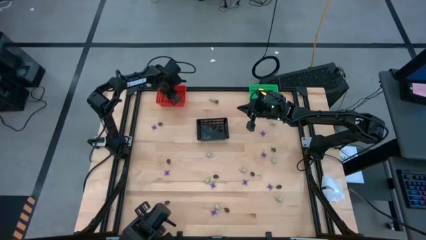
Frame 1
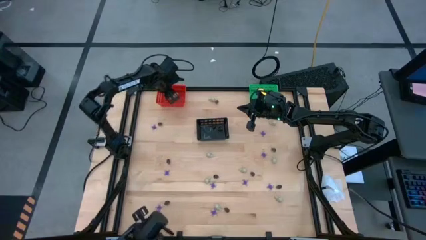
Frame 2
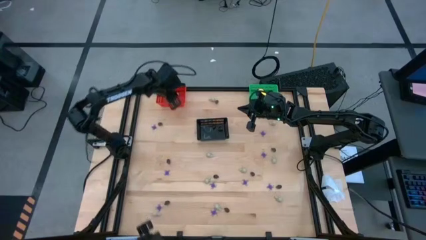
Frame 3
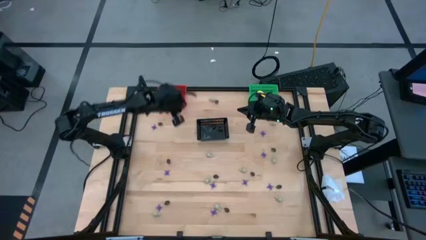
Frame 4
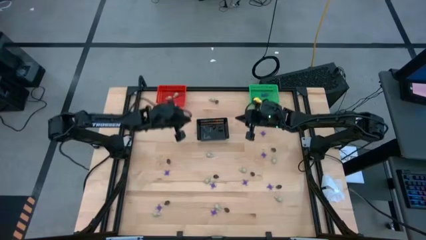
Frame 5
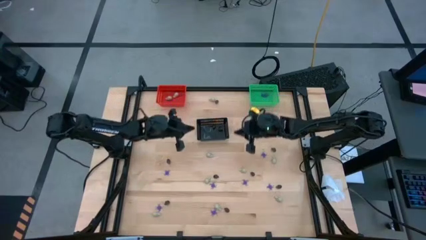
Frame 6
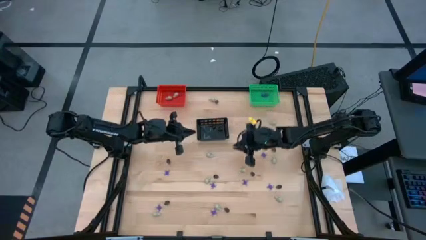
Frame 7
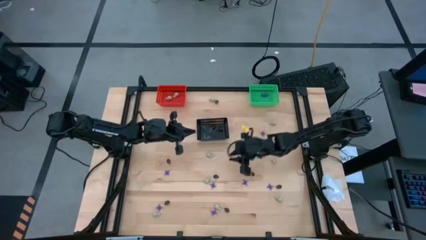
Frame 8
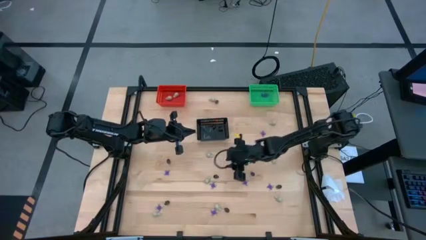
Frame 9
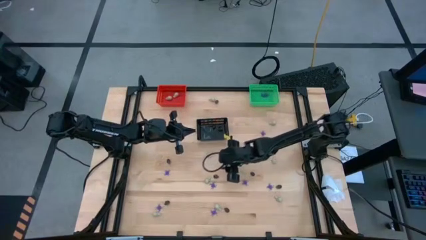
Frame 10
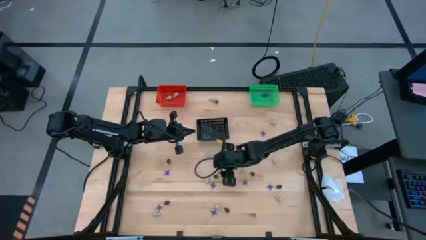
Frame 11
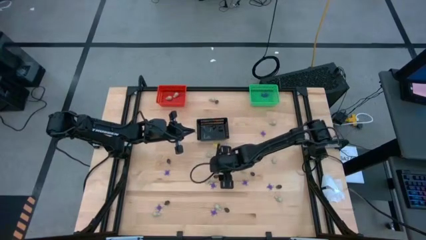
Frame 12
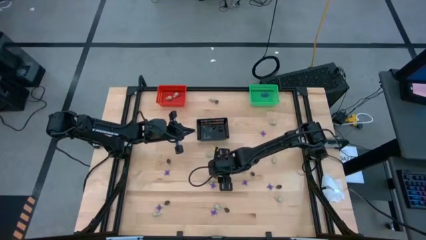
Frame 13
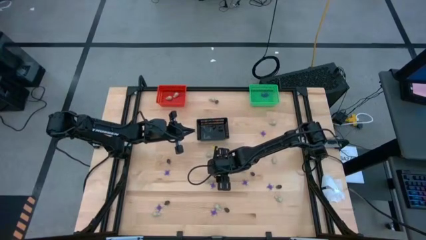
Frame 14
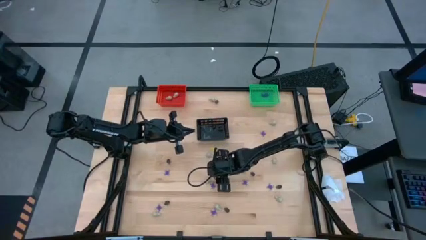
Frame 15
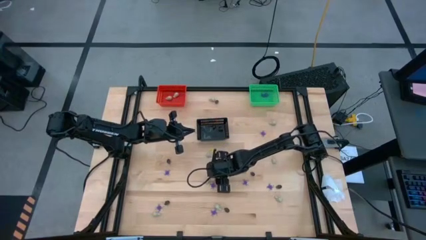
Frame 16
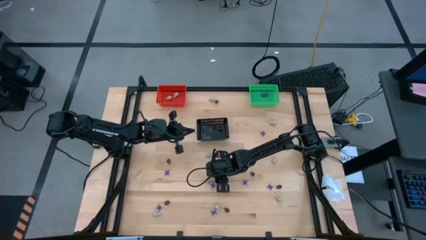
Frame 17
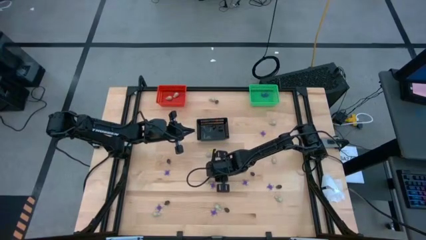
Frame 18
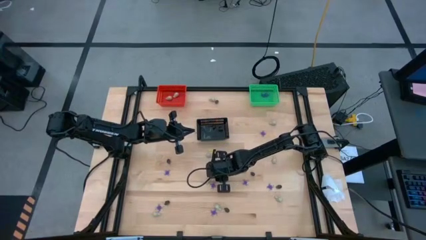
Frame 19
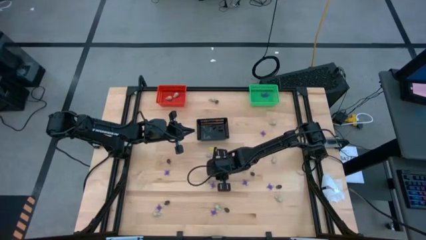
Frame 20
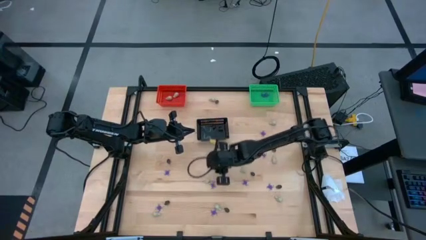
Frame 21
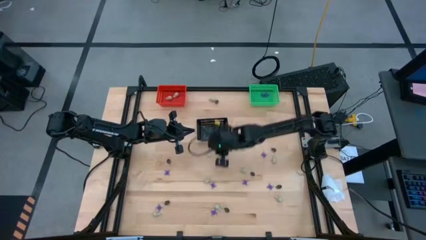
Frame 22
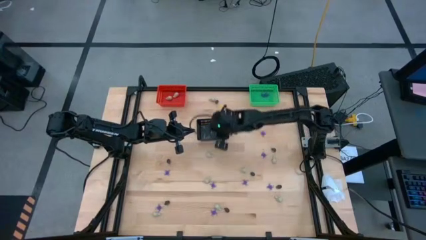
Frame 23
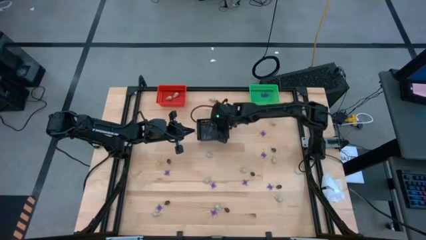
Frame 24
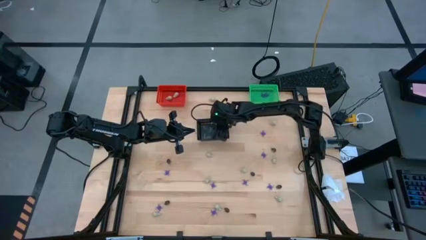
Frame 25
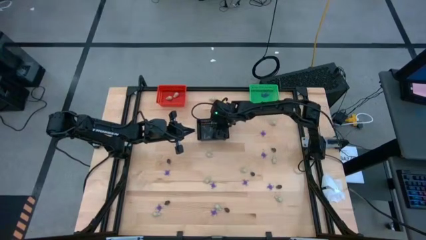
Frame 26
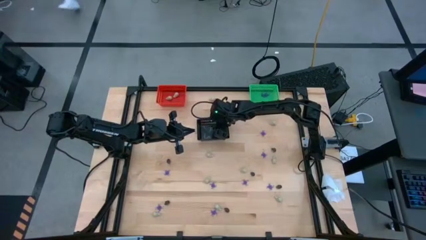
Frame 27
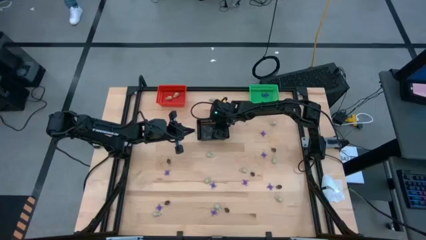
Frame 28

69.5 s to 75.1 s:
Task: Sort Halloween decoration
Put the black skull toy into the black bin

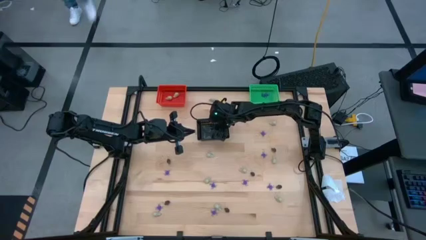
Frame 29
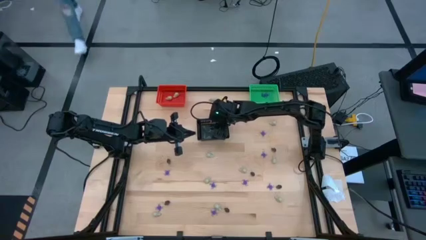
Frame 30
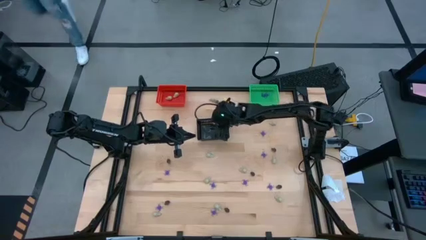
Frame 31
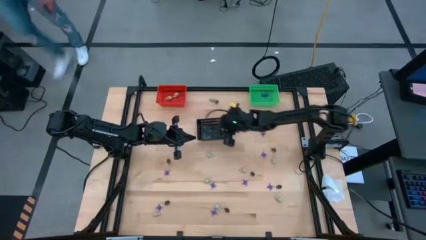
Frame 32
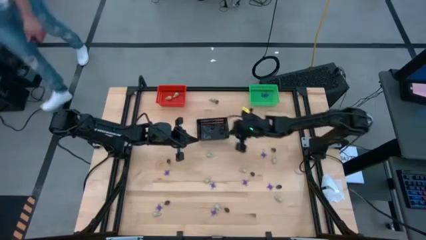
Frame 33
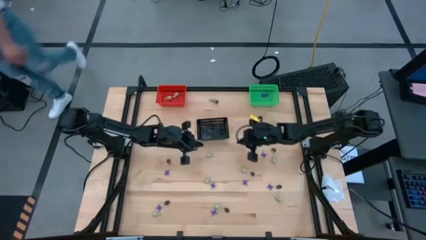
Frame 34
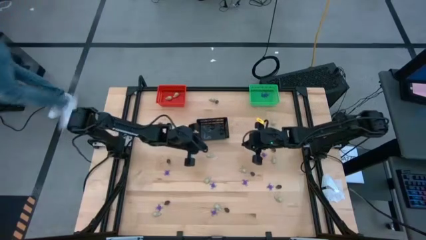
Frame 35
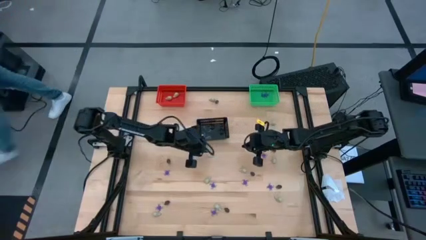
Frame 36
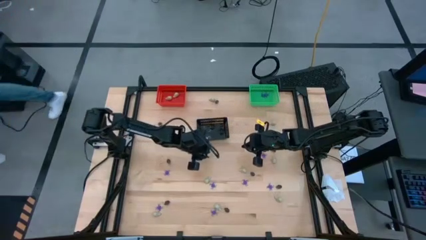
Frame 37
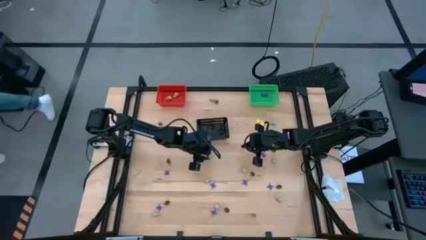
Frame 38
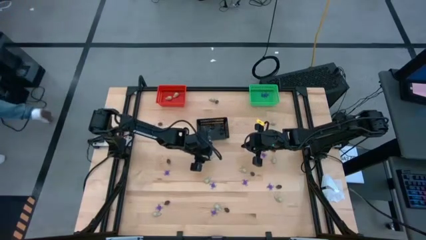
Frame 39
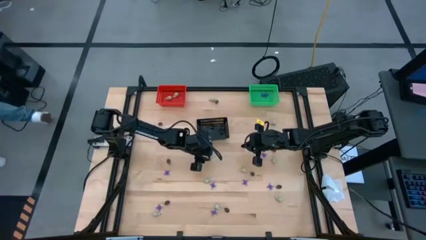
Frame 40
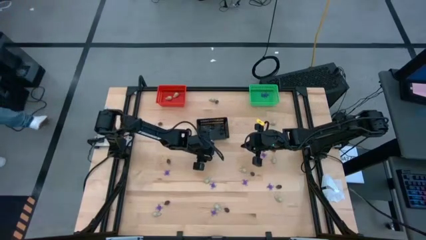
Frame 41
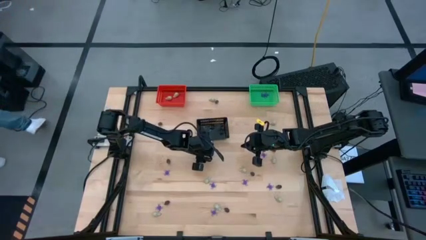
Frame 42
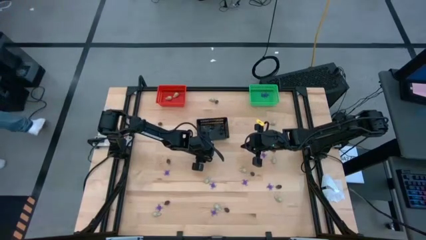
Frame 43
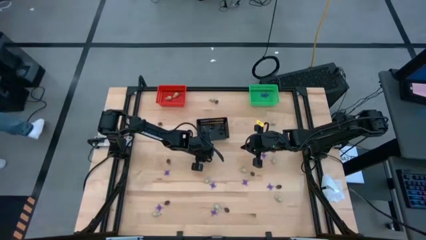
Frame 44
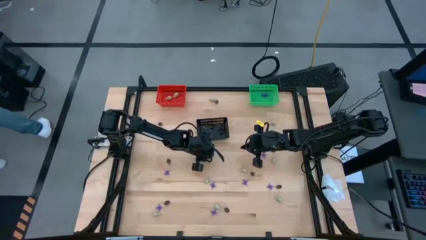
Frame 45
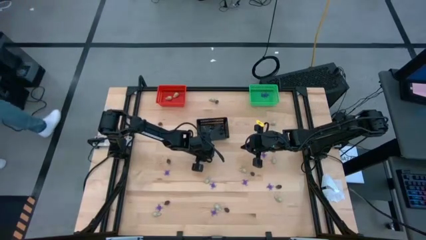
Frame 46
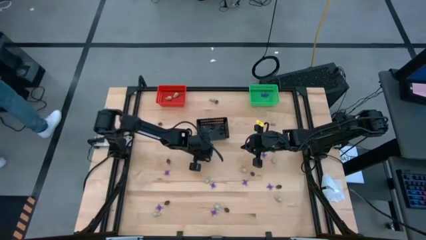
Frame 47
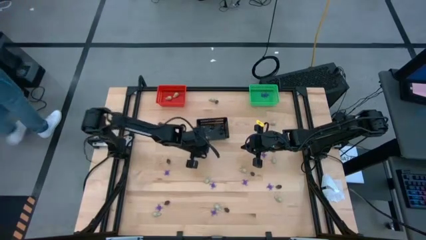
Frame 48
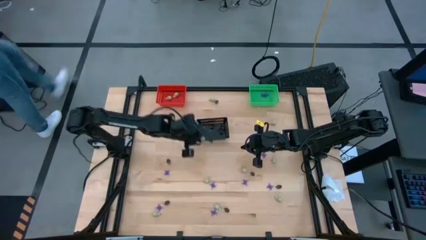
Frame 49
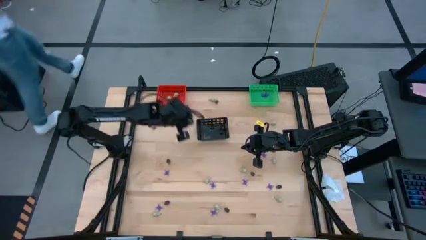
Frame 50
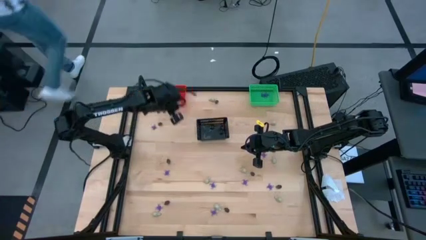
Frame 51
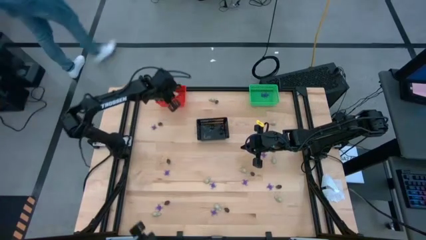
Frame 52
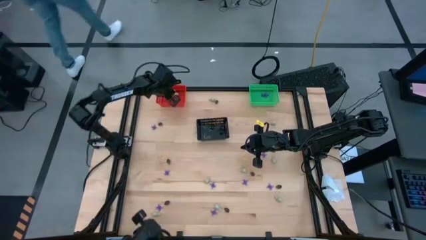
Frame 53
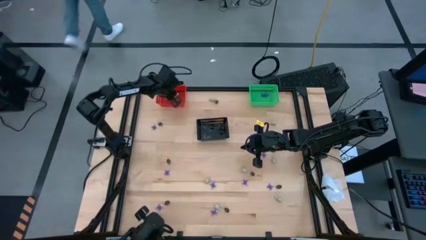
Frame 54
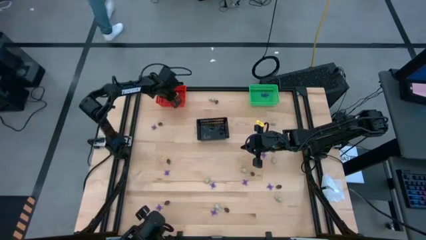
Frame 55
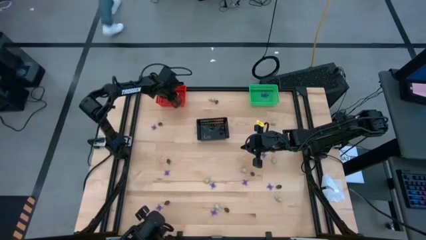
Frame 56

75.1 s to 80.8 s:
Put the white skull toy into the orange bin

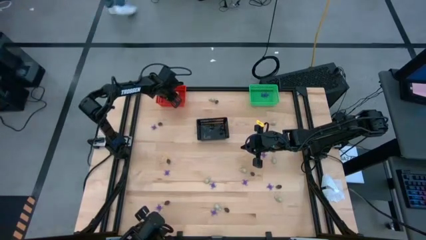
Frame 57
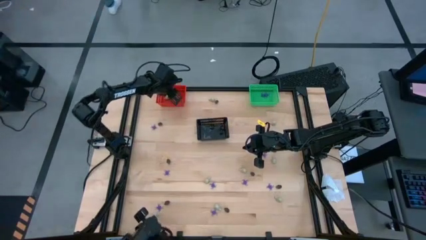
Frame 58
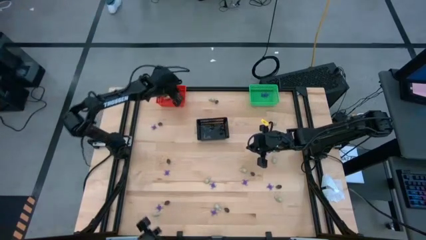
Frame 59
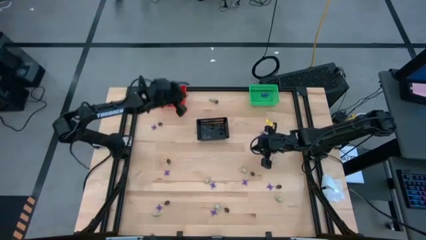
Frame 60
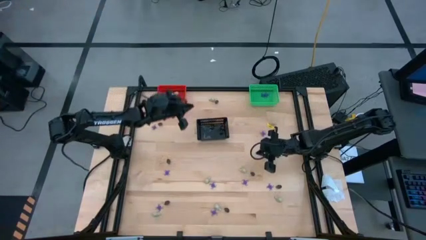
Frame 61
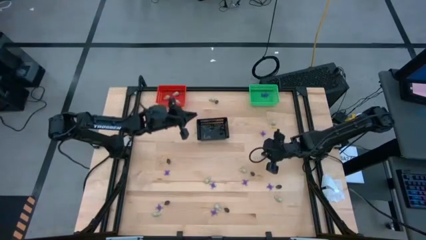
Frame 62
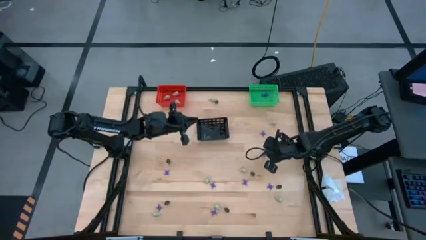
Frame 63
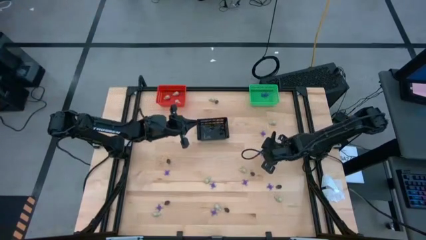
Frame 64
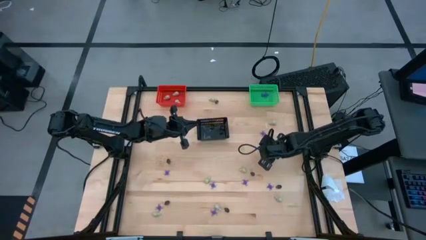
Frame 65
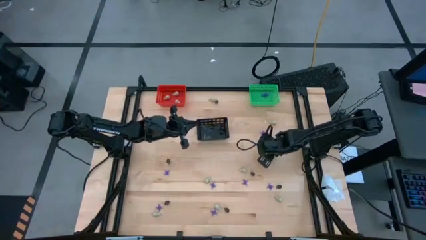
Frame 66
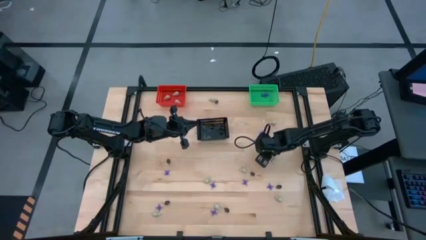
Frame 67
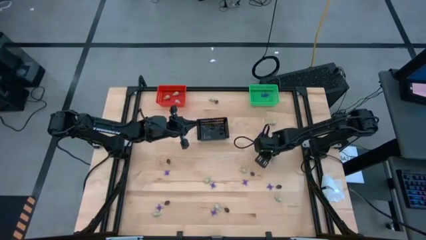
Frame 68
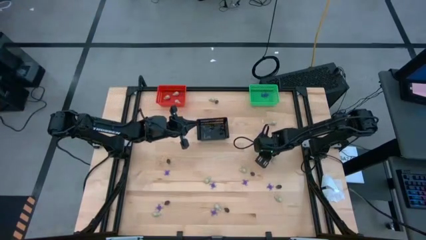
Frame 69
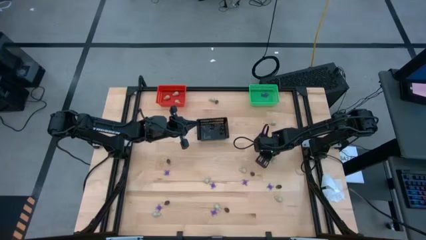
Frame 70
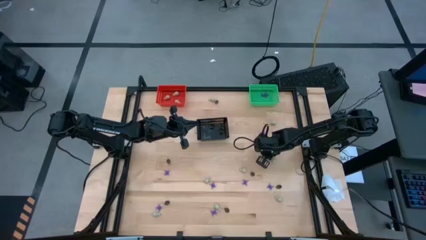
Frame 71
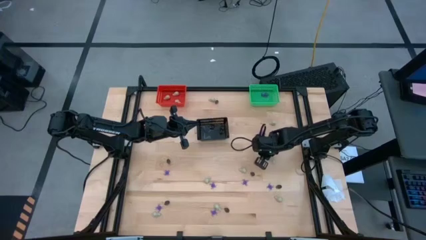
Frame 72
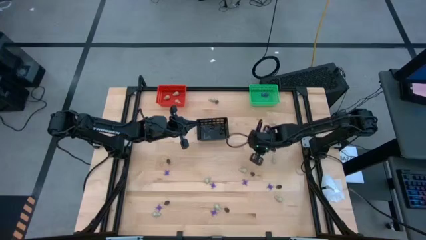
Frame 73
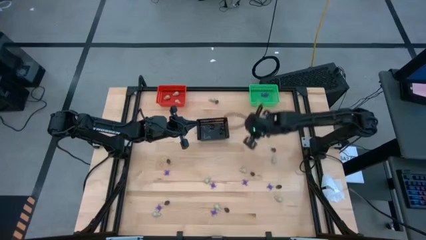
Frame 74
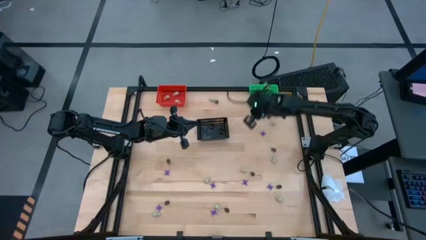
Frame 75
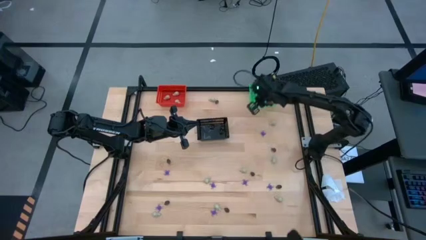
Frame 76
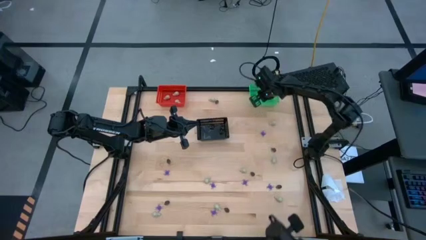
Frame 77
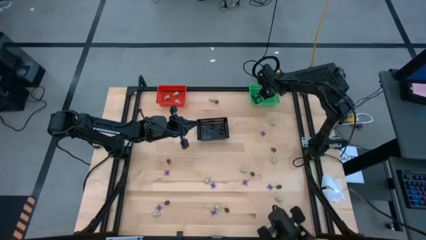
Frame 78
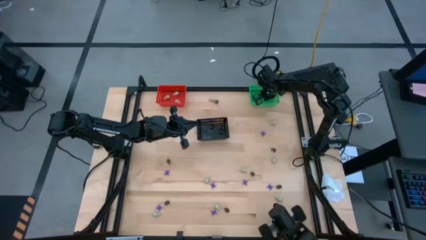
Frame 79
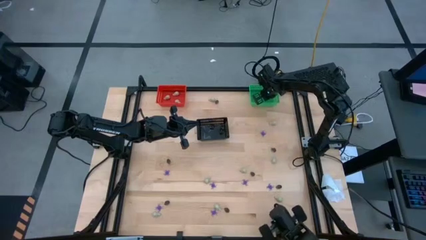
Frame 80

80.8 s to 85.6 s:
Put the violet spider toy into the green bin
